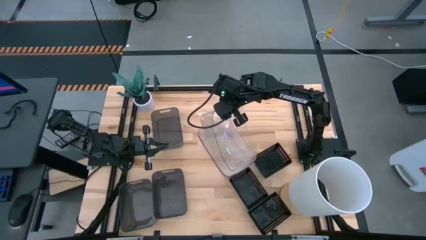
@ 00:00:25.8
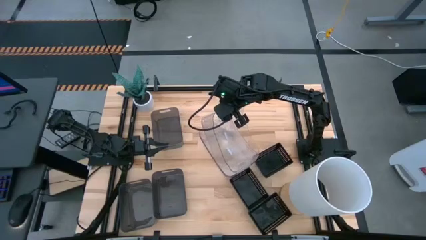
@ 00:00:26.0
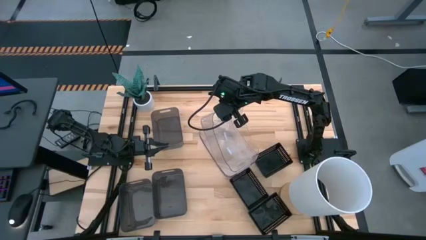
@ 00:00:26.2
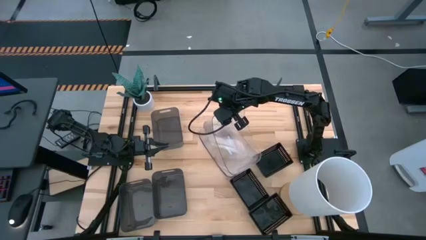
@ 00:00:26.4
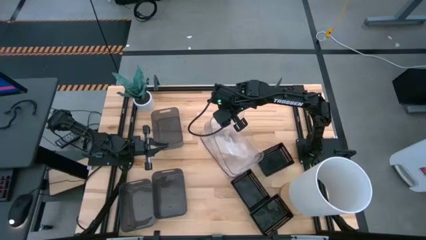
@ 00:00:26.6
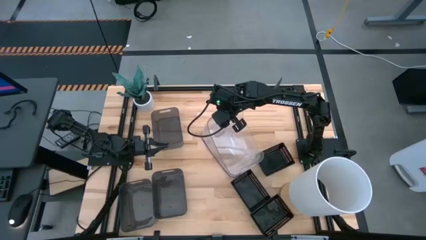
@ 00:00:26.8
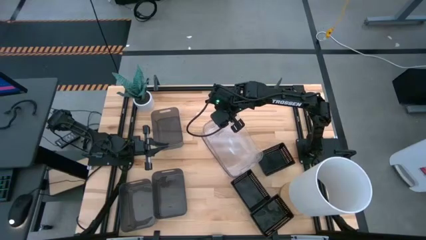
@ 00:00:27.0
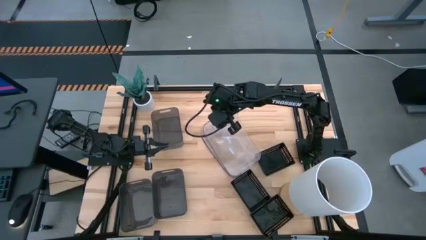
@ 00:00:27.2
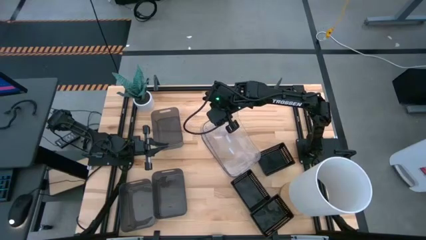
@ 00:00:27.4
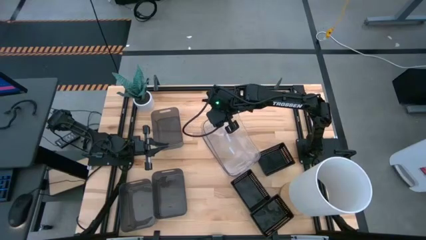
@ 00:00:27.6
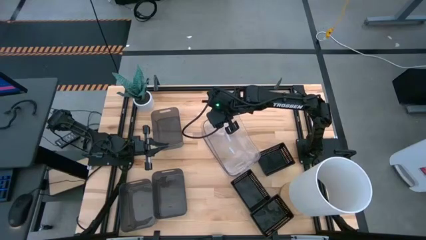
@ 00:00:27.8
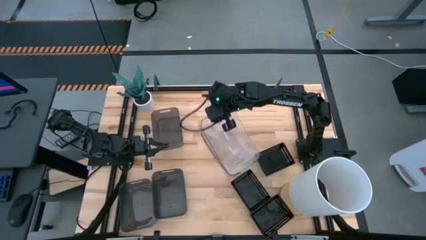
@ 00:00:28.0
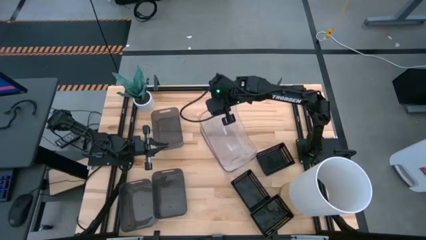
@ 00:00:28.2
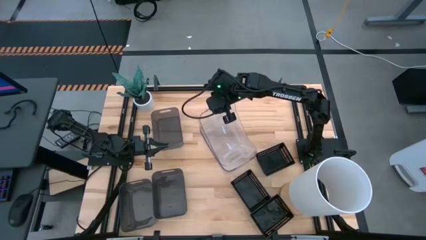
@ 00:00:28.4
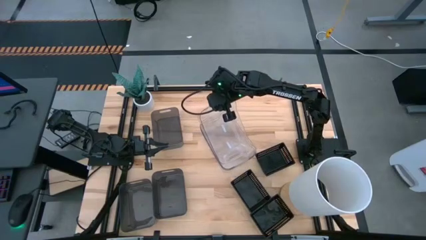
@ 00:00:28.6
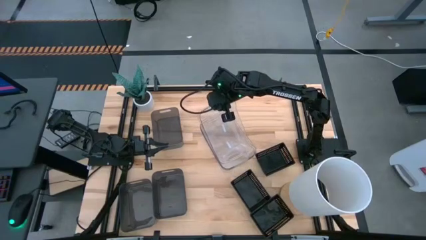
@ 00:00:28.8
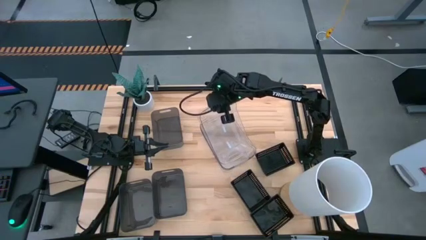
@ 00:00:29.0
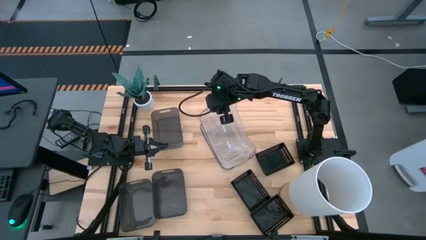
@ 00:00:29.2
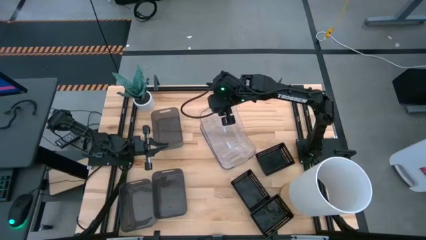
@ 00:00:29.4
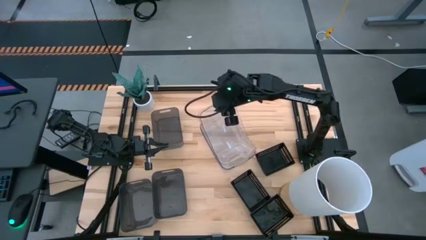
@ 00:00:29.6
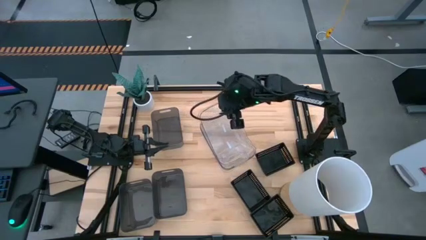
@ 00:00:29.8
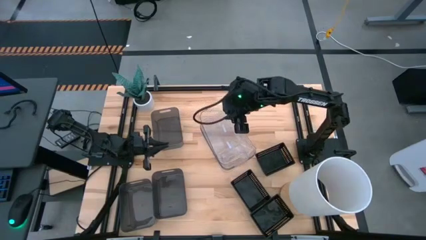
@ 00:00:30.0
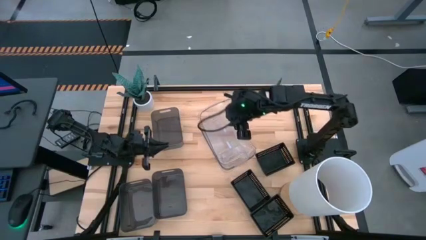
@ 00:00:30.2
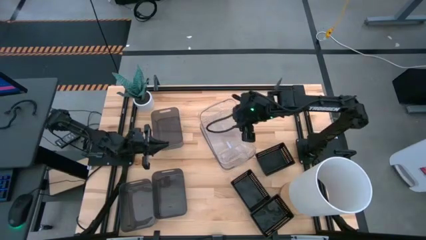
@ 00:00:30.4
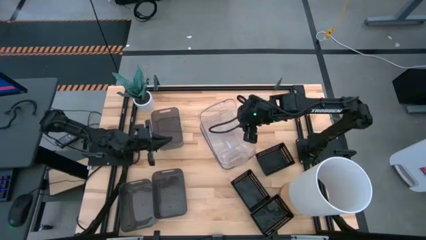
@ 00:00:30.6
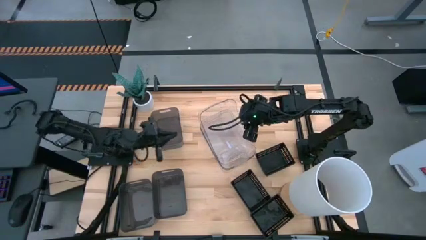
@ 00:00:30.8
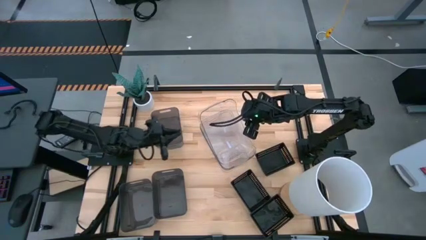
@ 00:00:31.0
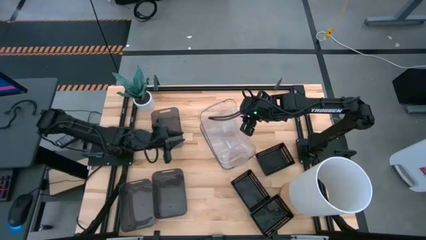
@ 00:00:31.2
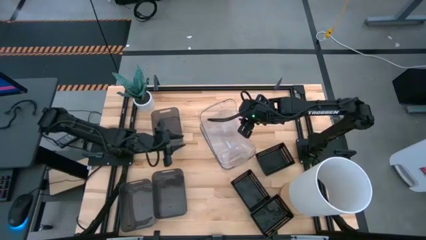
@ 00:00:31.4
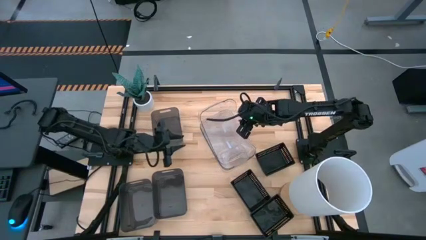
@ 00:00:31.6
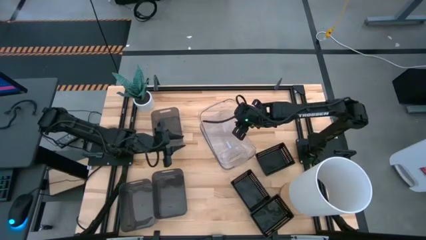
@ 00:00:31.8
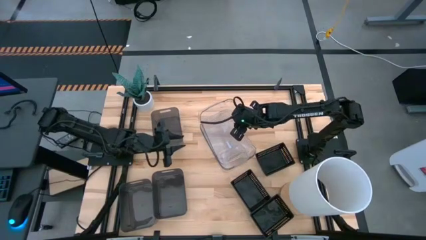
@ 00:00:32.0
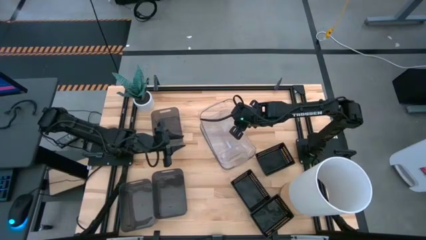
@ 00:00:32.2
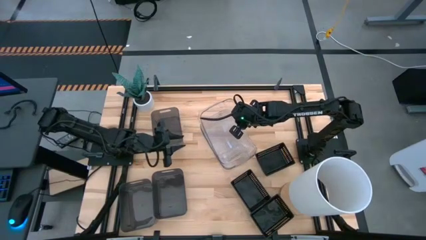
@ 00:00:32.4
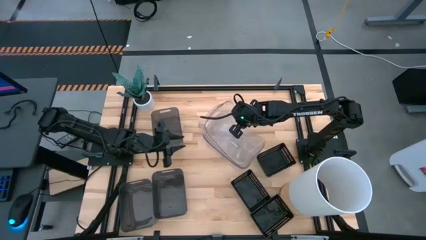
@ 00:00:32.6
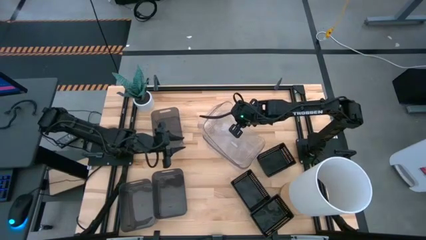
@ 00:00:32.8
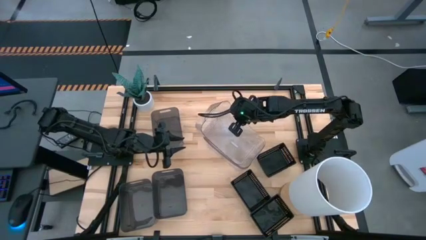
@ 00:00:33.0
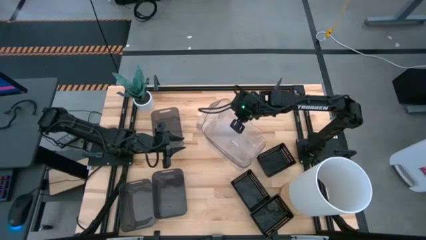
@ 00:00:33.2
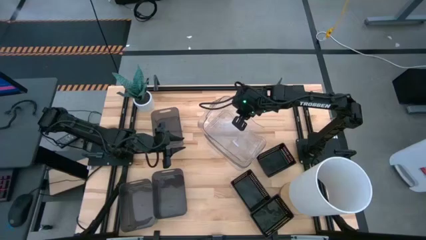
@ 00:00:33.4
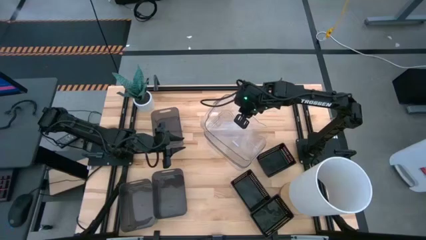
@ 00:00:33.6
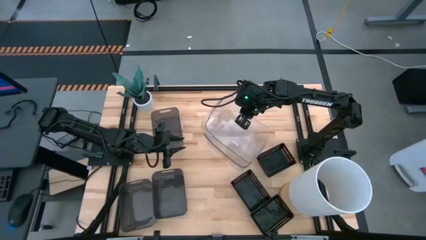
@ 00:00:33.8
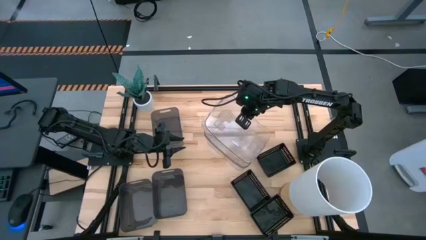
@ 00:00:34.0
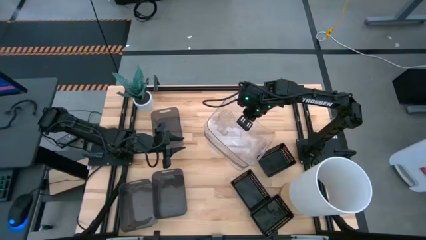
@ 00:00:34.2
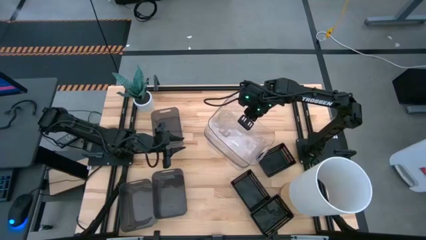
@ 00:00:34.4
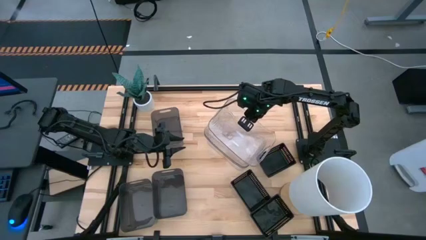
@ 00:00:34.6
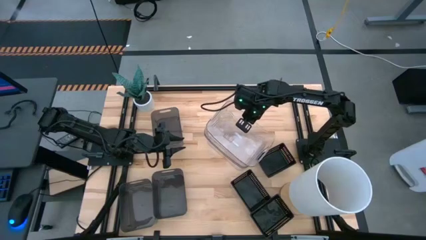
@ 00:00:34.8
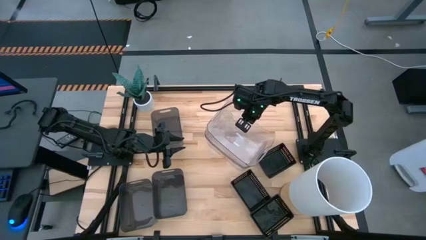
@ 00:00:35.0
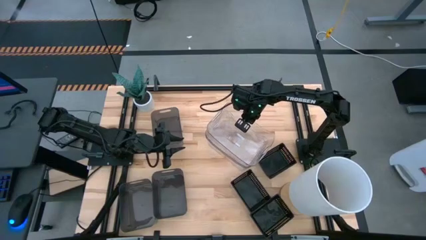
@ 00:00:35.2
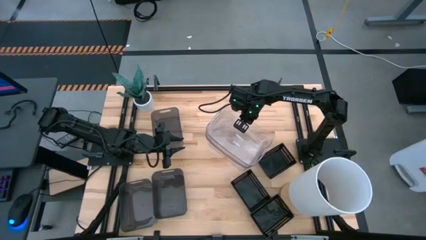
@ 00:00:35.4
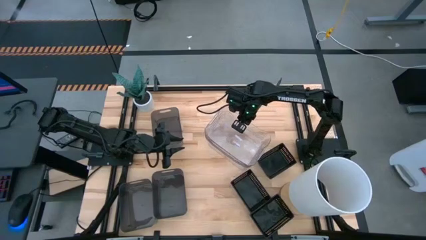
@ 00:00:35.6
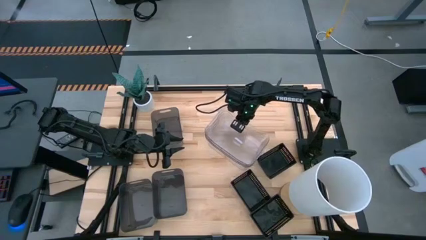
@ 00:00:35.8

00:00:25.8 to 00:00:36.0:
Stack the right transparent bin on the left transparent bin

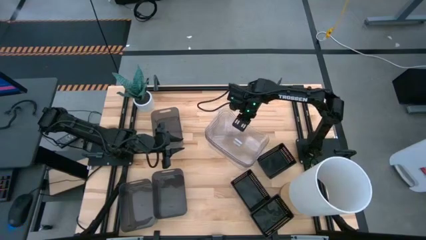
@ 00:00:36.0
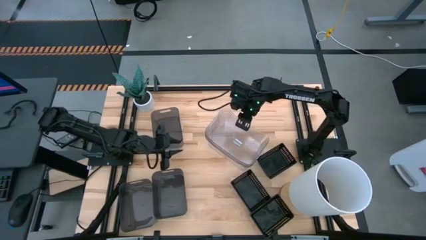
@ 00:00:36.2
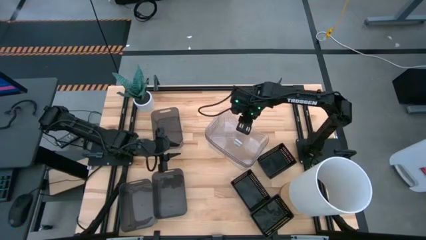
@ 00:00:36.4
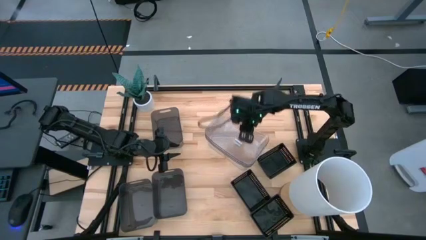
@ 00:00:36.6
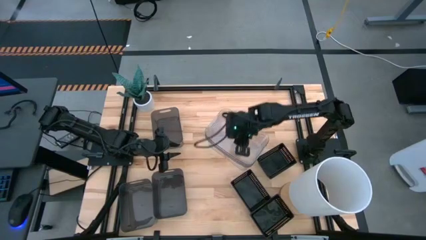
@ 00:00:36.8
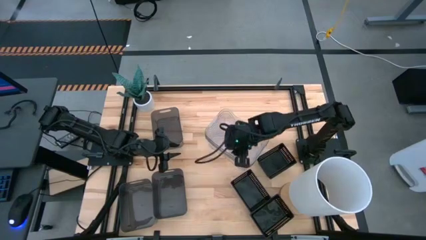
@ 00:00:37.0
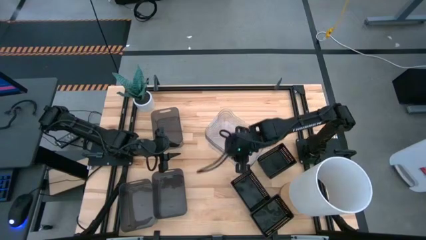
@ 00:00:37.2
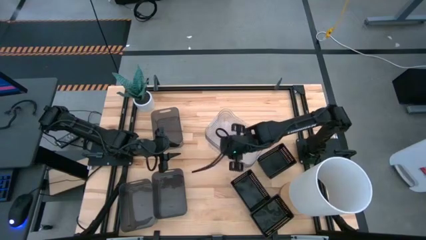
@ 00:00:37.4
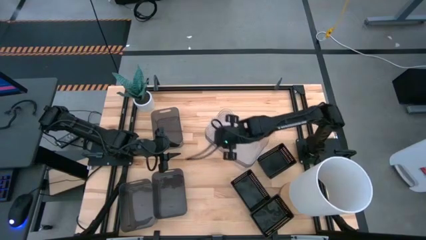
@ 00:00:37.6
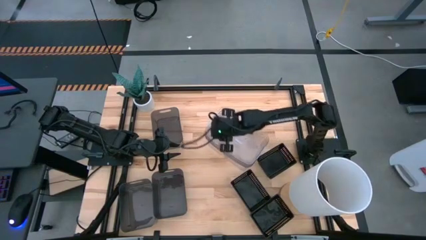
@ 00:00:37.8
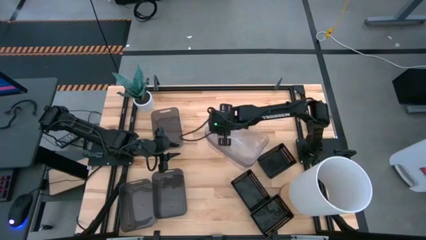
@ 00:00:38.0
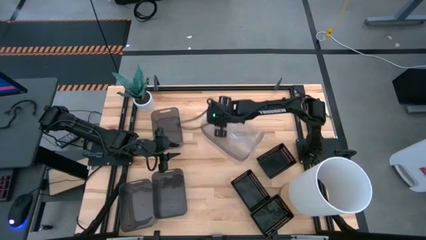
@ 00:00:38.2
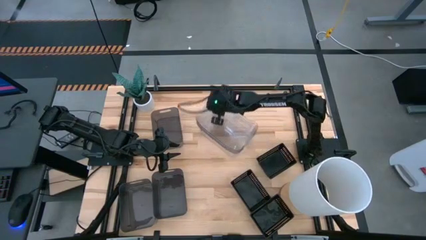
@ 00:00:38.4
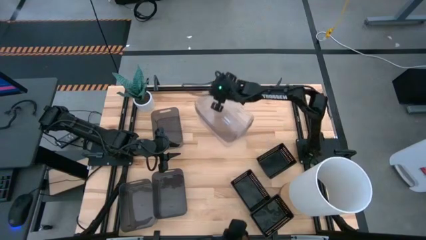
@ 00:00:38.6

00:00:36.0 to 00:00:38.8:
Move the stacked transparent bin

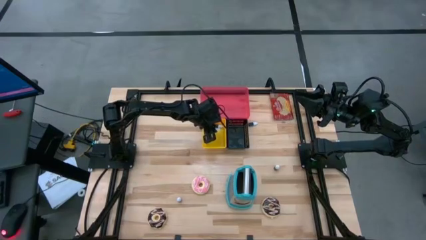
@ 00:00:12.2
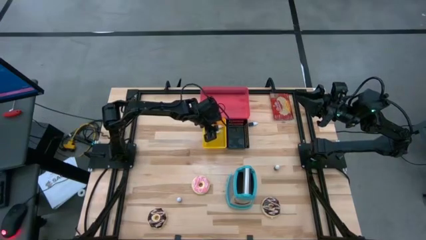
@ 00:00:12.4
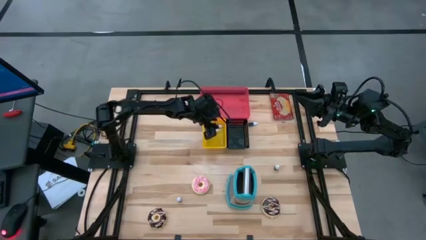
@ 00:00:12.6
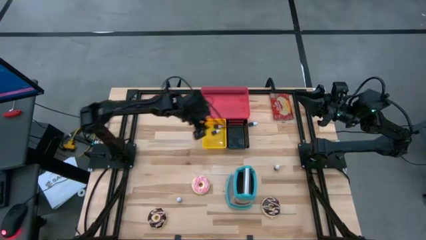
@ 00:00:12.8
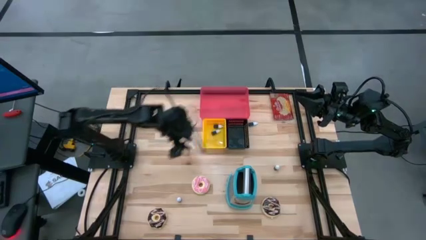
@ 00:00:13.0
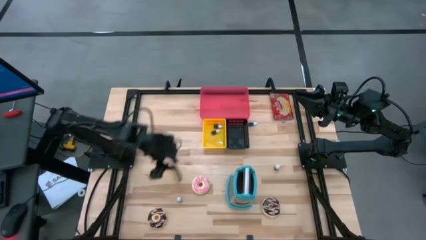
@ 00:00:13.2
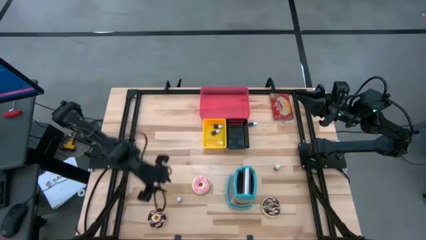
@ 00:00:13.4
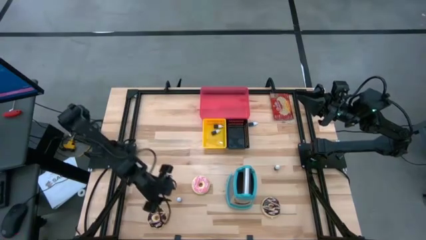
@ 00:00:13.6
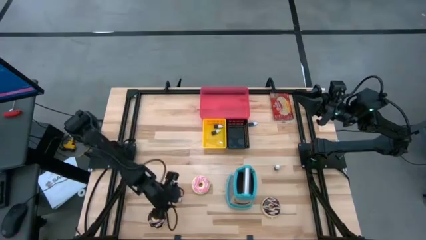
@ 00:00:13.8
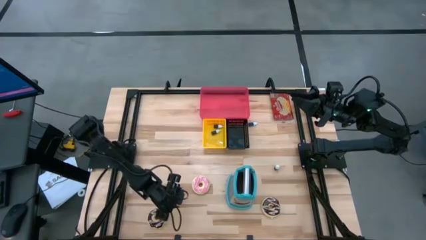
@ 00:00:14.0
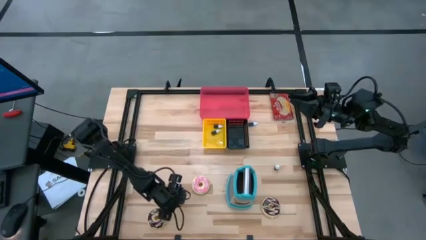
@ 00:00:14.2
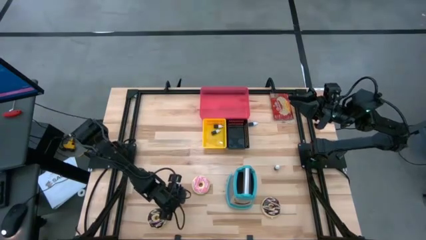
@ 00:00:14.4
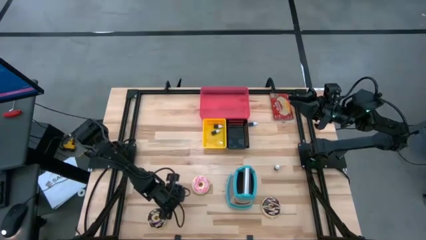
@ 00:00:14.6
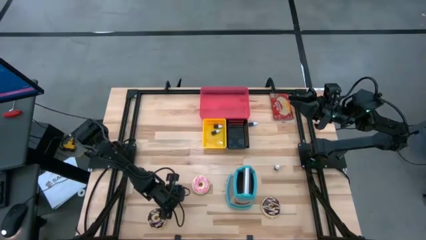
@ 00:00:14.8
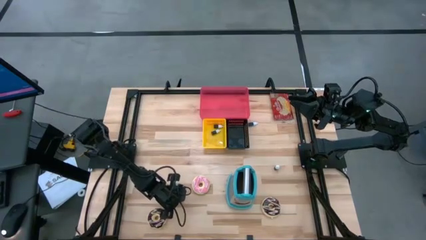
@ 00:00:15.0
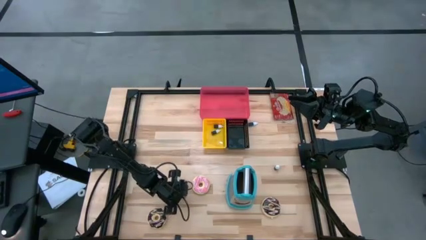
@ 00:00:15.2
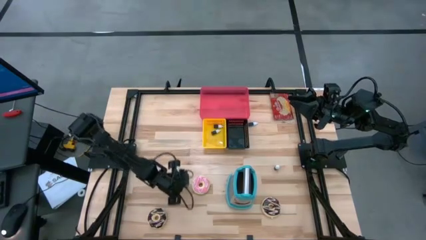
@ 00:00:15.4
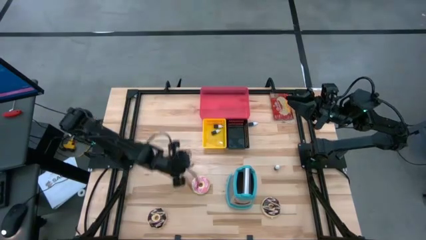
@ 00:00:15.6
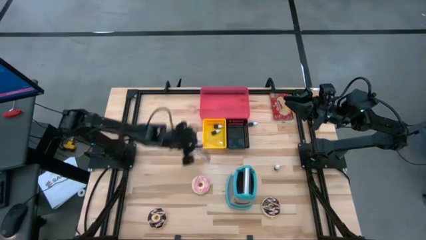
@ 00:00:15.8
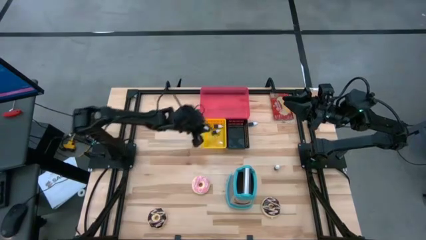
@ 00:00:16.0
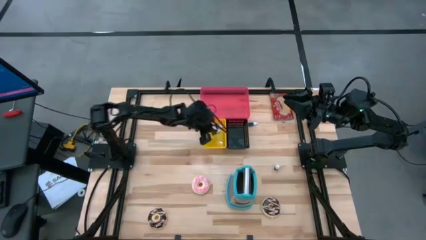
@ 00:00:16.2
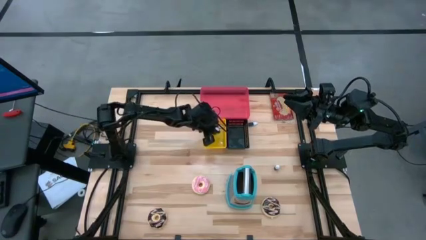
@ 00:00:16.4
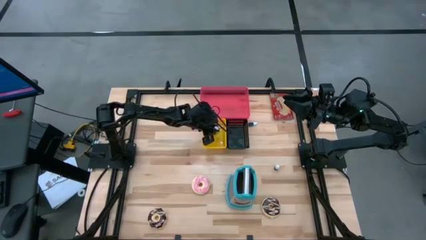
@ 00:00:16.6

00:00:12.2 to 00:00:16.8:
Put the left red food coloring bottle into the yellow bin
